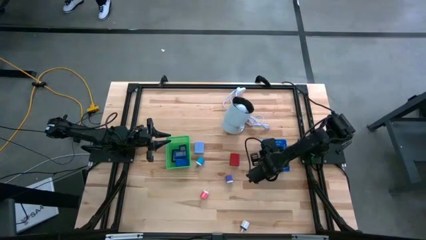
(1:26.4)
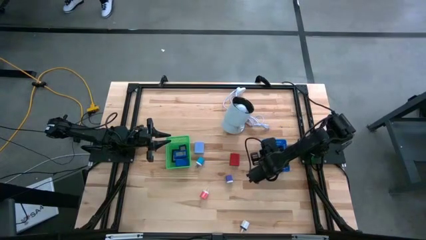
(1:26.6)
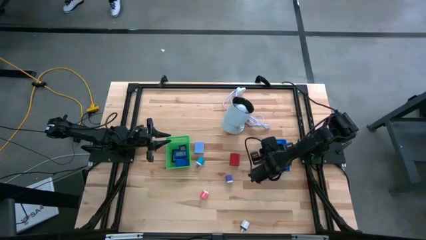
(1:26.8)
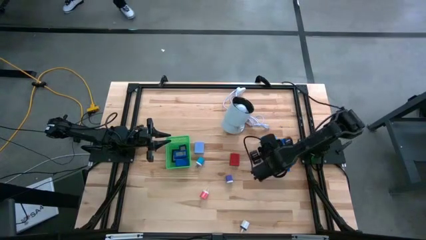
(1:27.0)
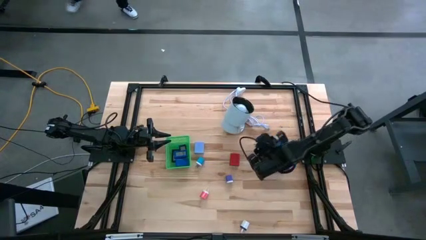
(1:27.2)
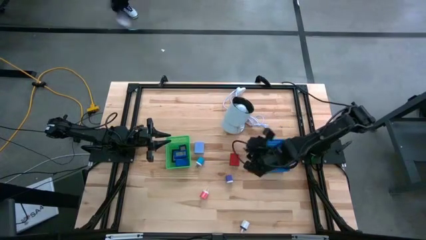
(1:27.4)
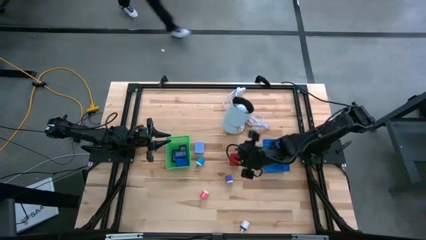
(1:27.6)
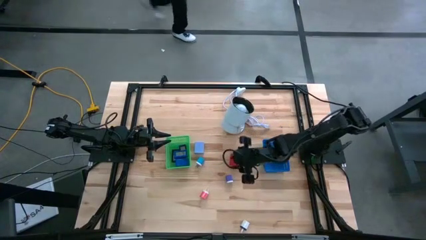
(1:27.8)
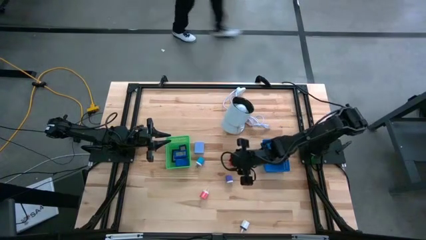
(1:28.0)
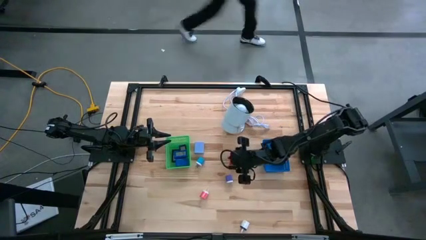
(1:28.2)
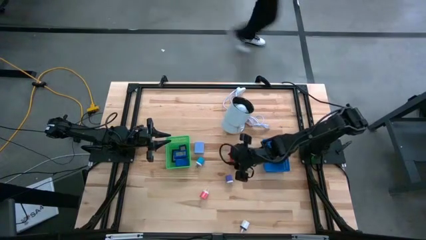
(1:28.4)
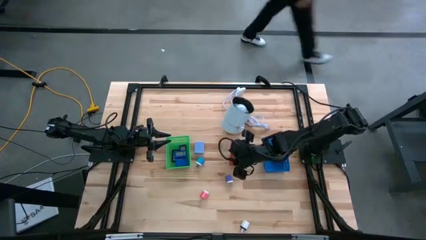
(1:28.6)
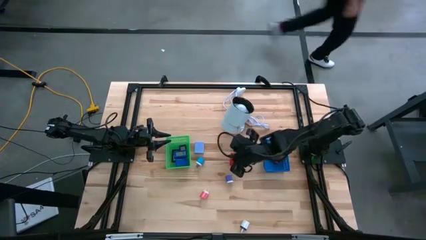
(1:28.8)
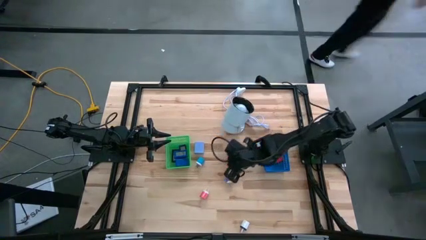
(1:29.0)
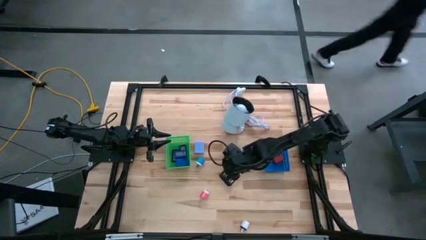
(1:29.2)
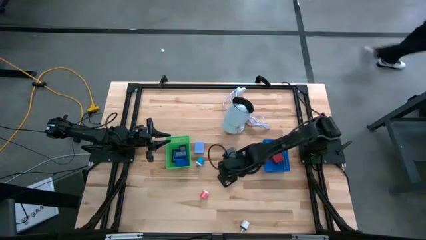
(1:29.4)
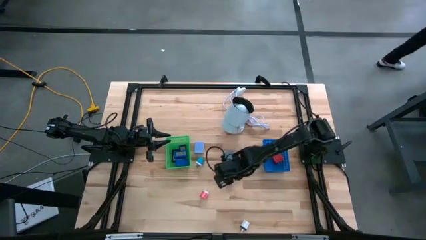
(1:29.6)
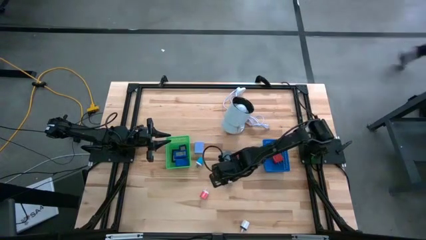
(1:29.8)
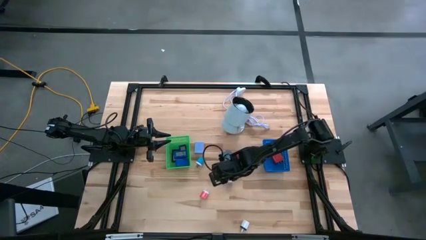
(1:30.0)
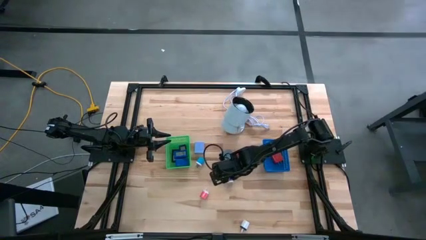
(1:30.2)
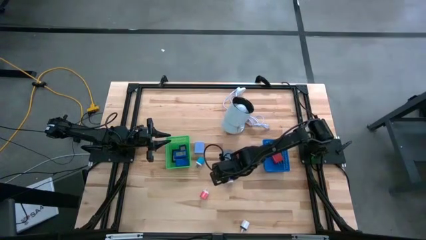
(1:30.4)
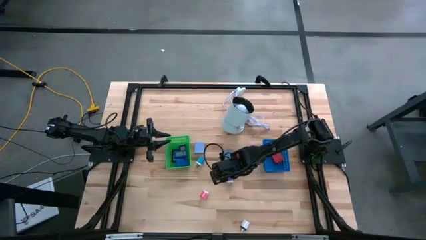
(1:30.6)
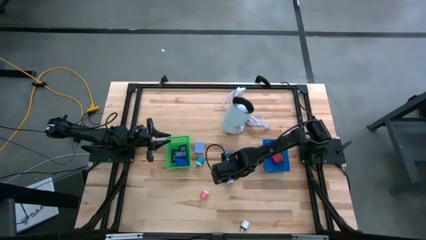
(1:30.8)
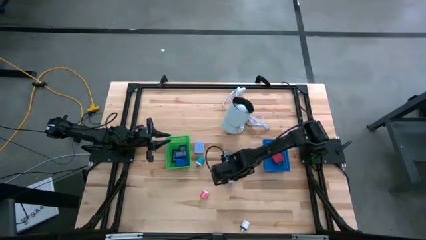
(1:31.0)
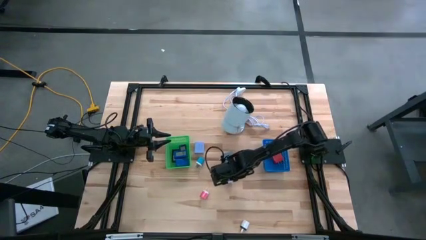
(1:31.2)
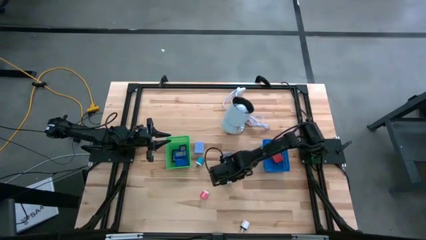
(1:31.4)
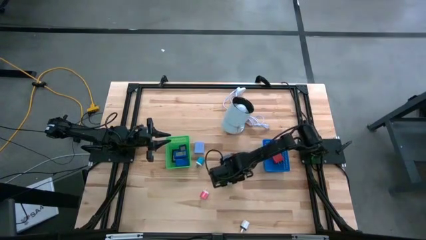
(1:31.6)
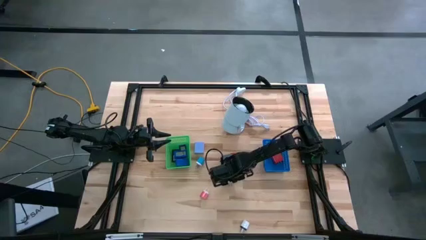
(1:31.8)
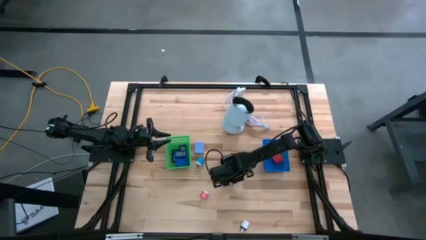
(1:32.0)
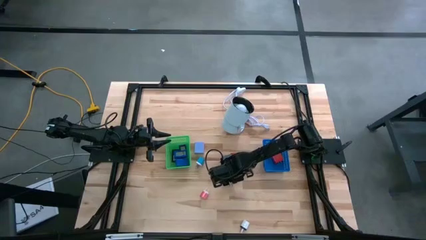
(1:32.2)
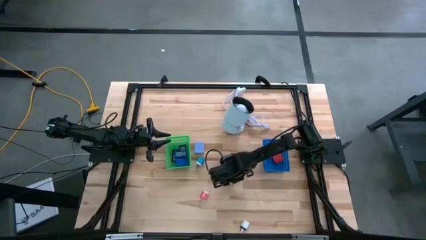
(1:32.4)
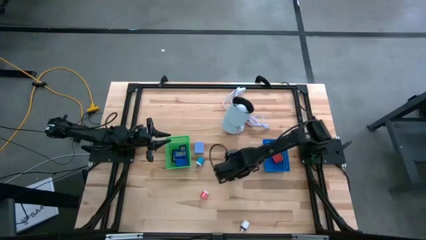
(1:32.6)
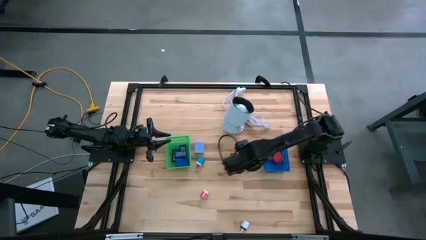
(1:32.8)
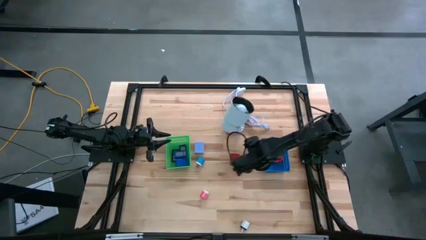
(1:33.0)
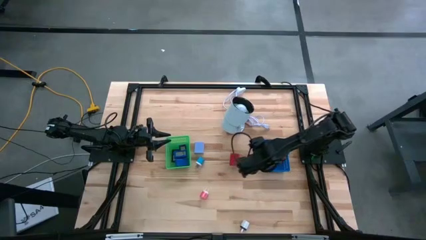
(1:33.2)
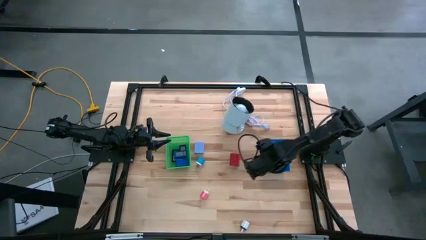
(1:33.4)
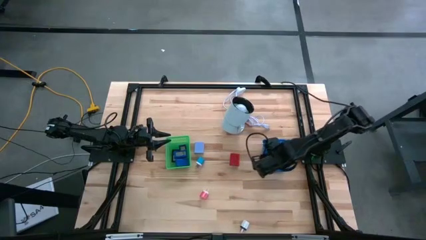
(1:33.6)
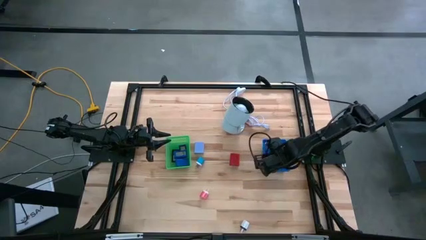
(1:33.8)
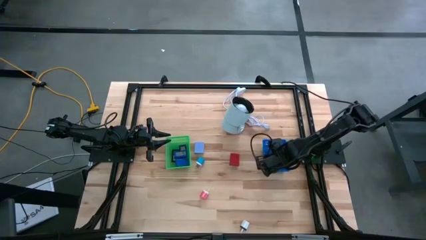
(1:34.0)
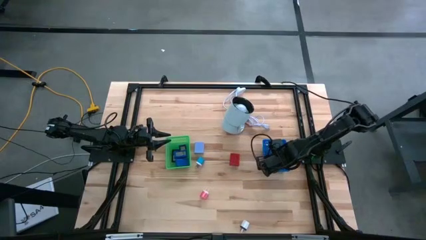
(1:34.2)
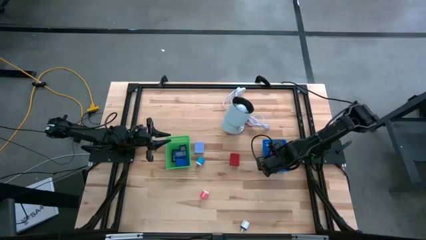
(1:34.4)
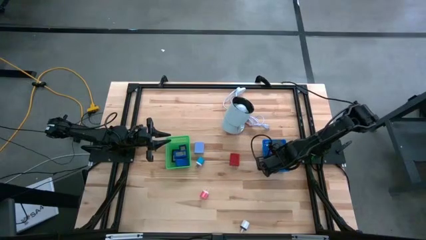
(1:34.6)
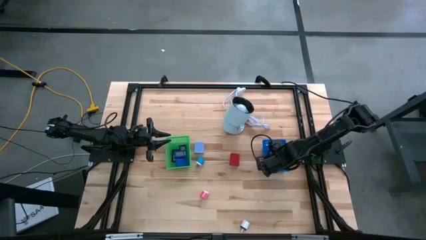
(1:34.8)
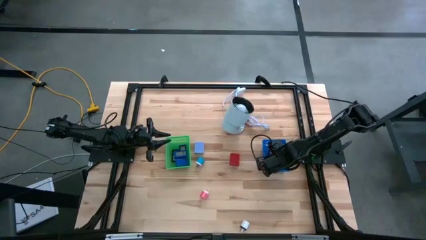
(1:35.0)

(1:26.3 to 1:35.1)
Task: Pick & Place Office items
Put the violet charger adapter into the blue bin

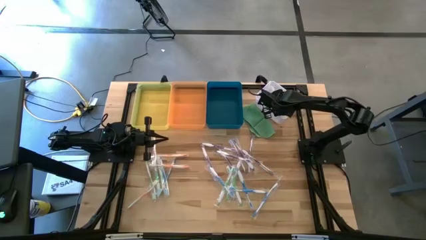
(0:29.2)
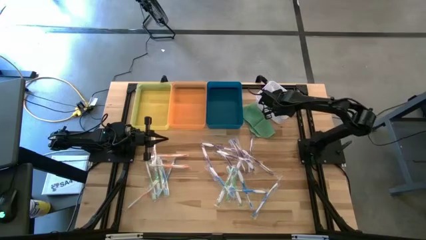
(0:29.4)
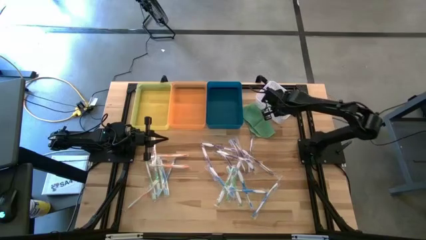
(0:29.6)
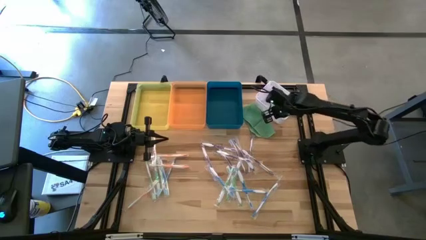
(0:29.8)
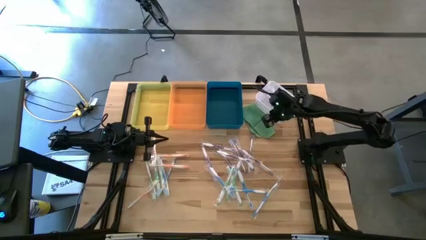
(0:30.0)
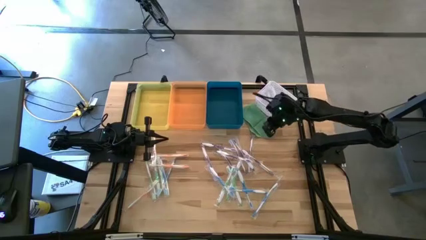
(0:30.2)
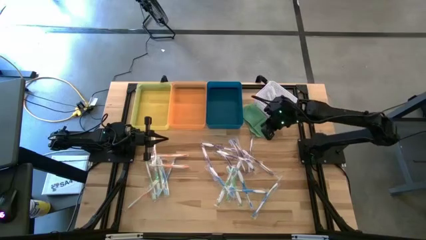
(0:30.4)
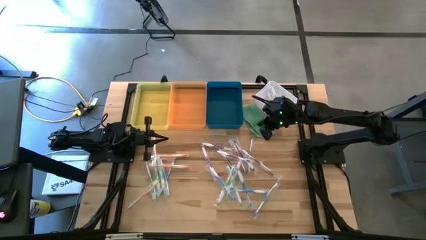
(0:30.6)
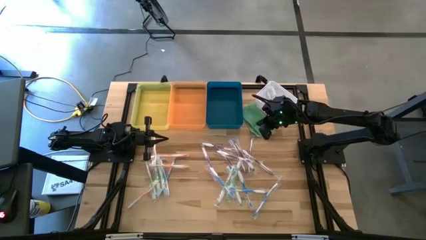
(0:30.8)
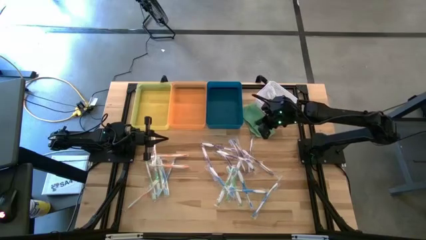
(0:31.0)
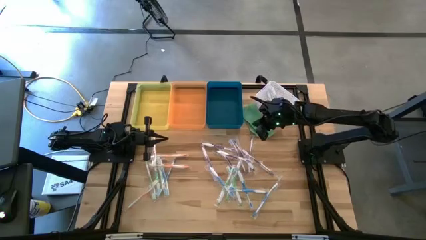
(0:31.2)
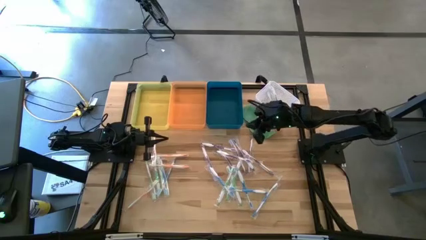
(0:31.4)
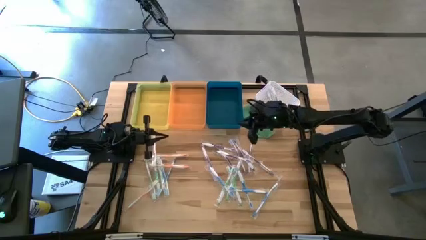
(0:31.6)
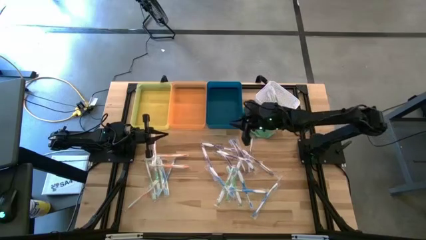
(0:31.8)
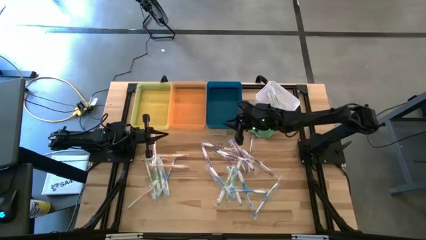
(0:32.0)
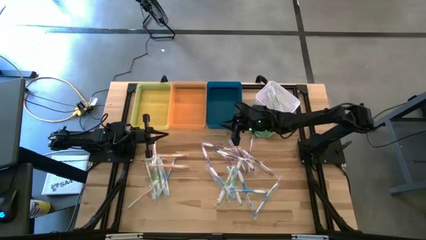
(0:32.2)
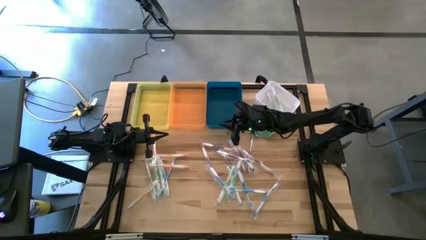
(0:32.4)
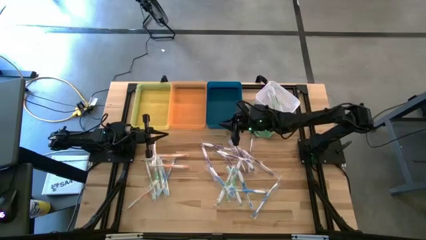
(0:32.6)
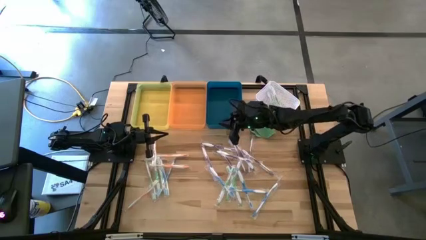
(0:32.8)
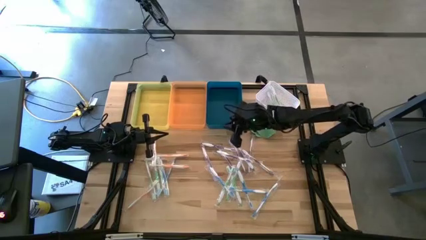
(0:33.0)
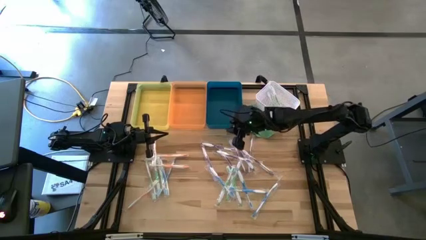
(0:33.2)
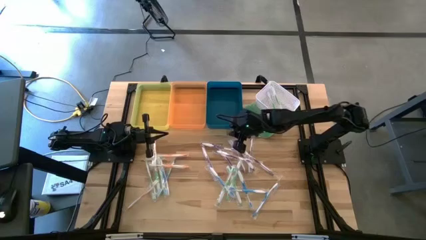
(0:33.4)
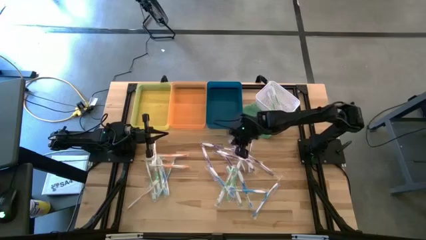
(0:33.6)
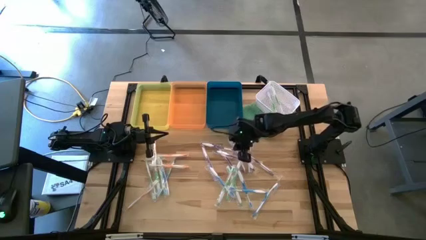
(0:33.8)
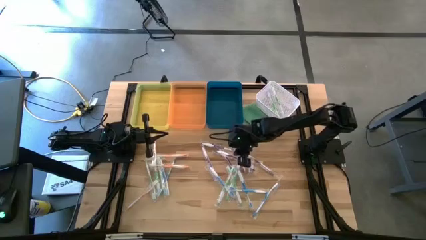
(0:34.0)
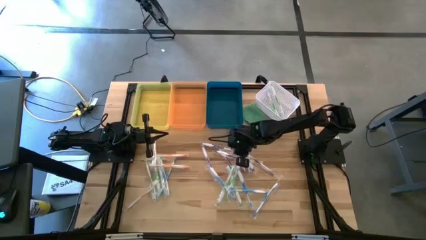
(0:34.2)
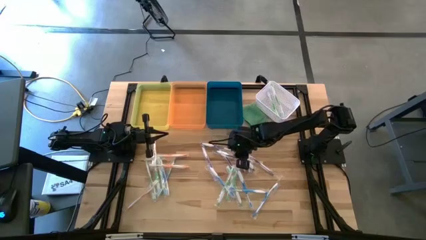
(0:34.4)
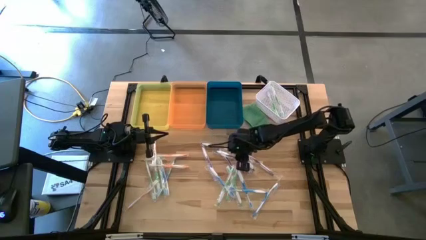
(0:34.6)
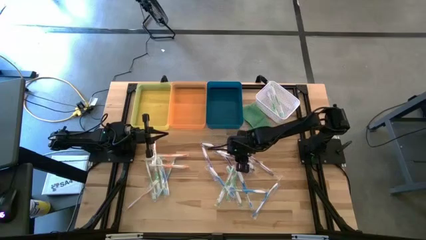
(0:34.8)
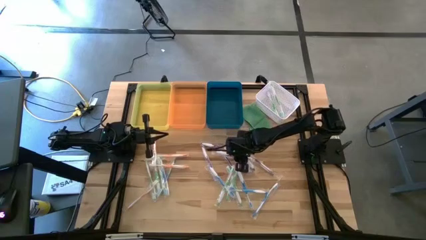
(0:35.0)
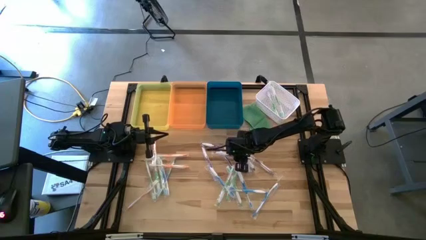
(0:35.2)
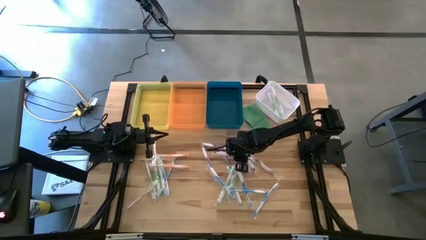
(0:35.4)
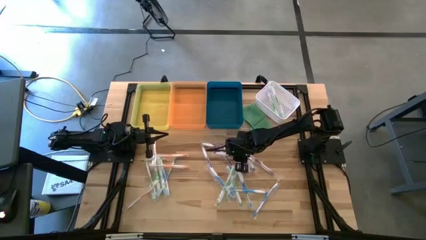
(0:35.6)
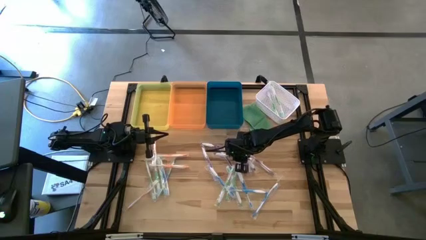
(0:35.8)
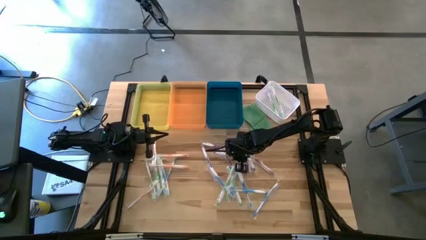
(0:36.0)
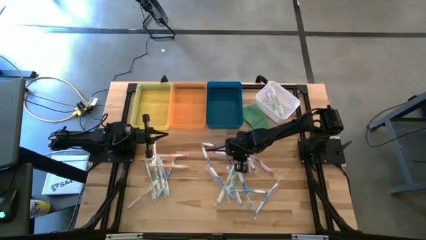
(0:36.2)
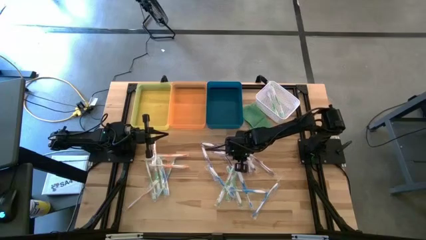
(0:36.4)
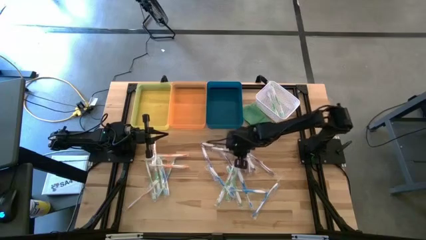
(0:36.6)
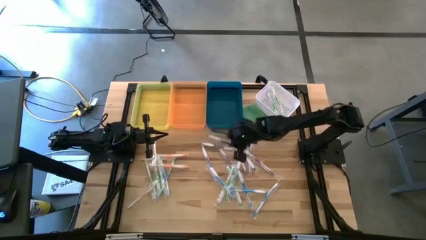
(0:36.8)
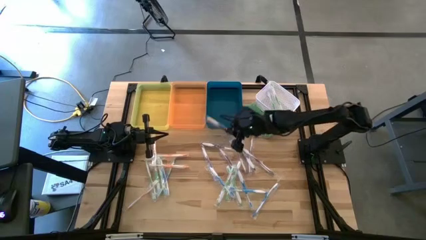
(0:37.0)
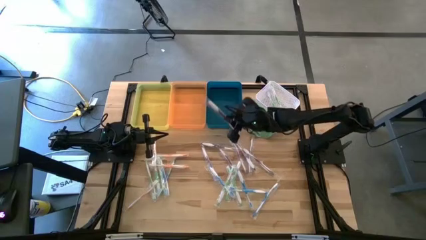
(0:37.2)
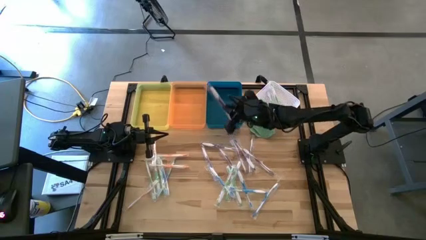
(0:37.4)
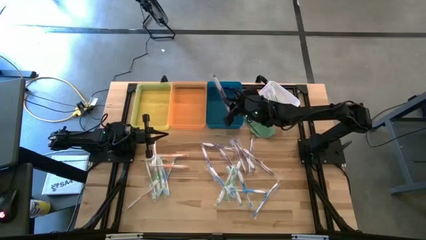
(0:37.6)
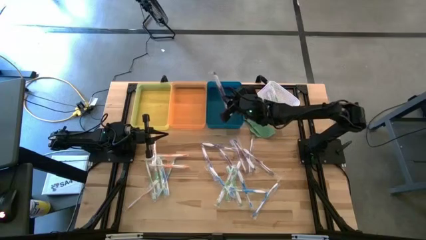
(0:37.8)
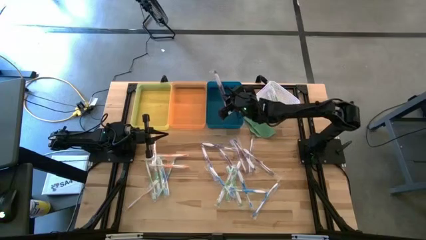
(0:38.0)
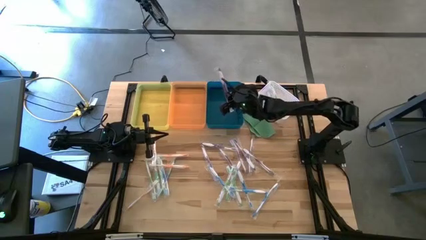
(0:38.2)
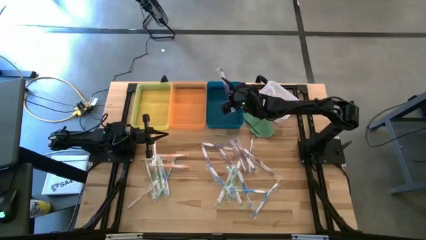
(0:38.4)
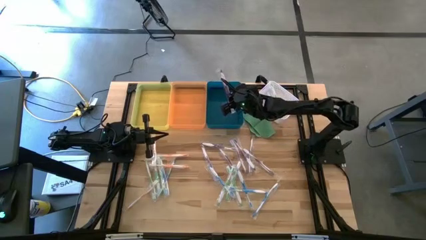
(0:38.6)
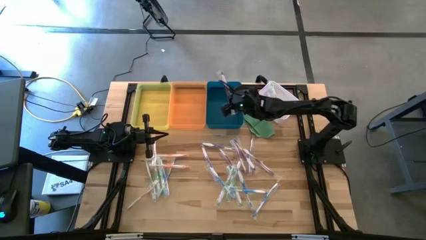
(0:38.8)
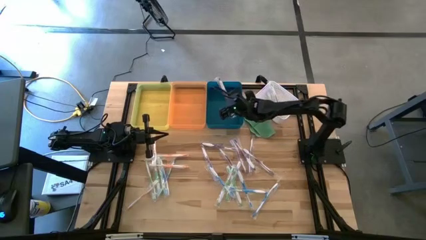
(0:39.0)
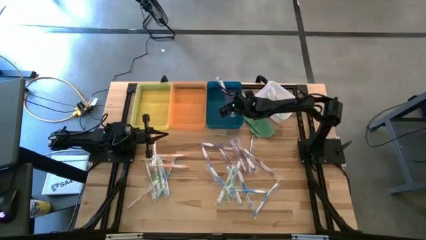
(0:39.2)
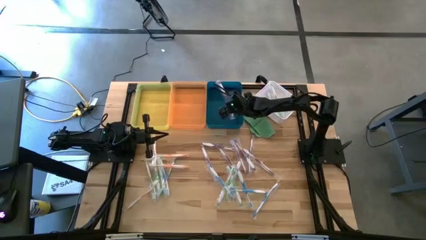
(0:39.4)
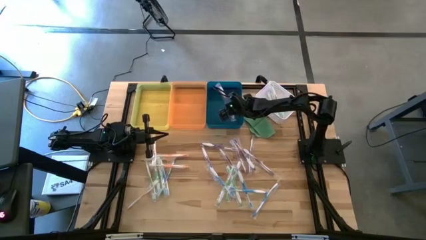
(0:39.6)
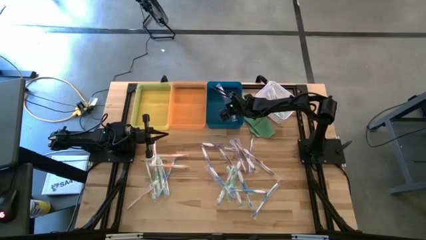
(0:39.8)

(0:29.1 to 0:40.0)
Task: Pick & Place Toothbrushes
Put the purple toothbrush into the blue bin
